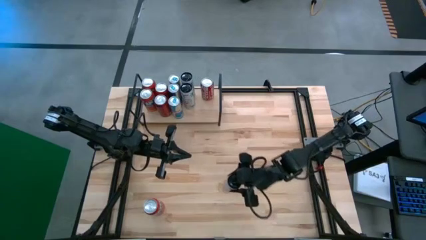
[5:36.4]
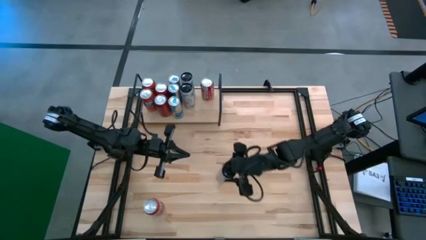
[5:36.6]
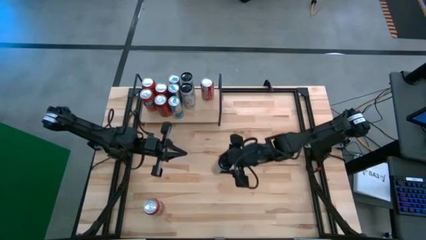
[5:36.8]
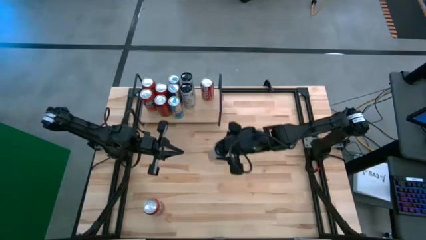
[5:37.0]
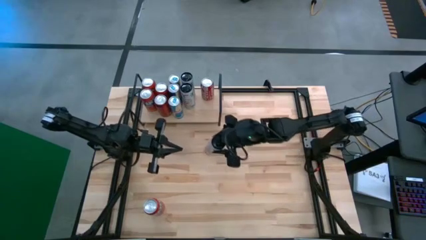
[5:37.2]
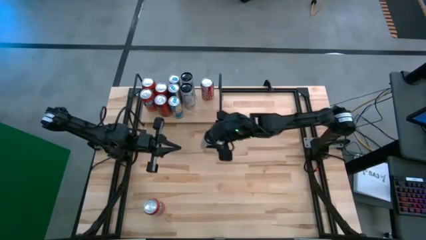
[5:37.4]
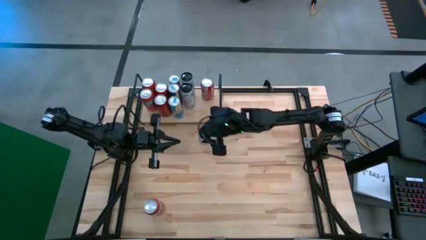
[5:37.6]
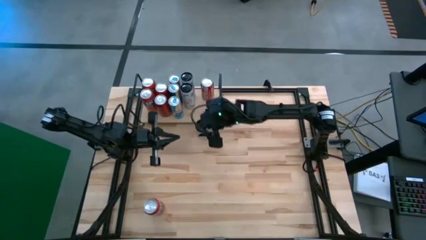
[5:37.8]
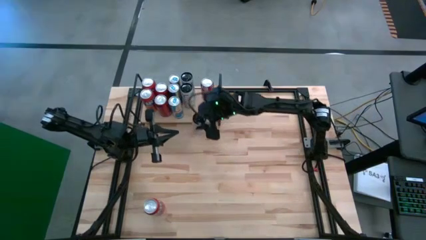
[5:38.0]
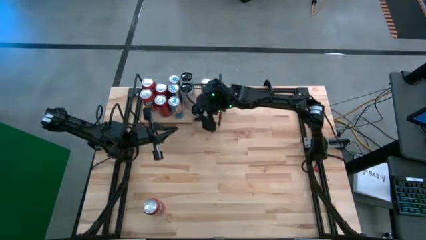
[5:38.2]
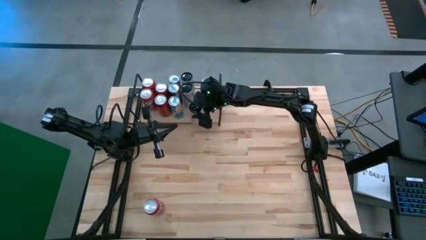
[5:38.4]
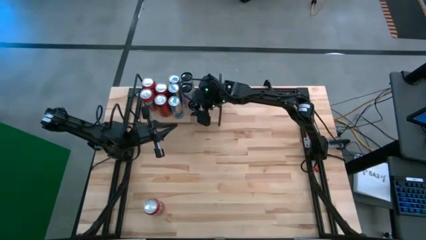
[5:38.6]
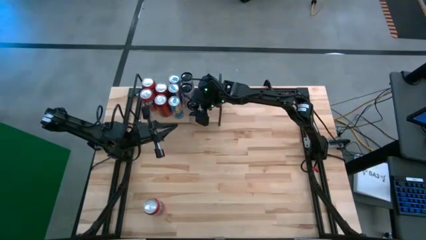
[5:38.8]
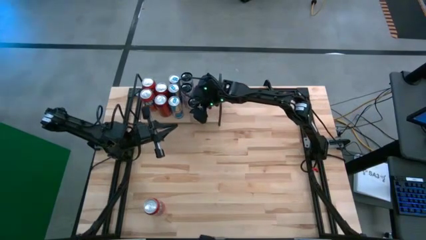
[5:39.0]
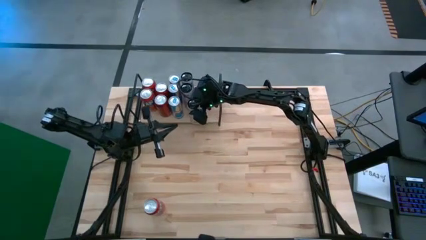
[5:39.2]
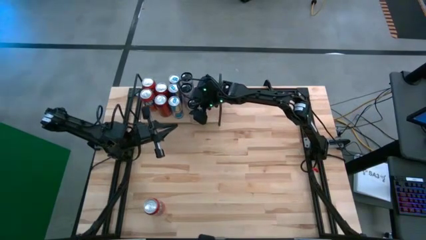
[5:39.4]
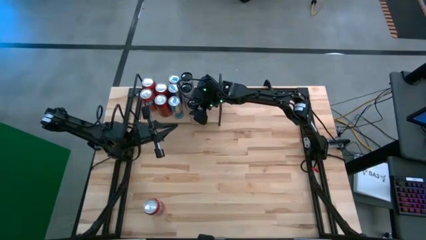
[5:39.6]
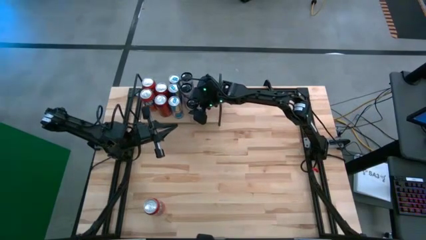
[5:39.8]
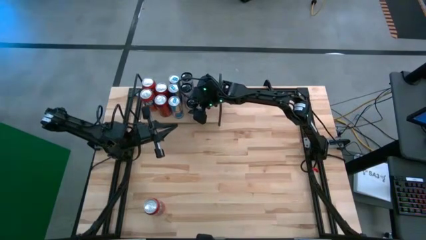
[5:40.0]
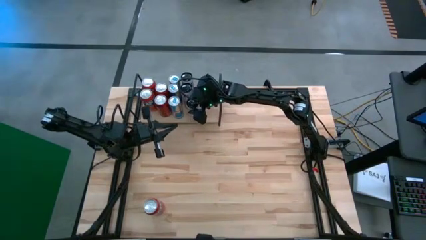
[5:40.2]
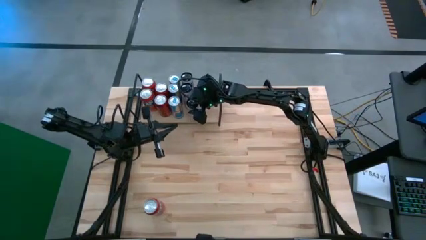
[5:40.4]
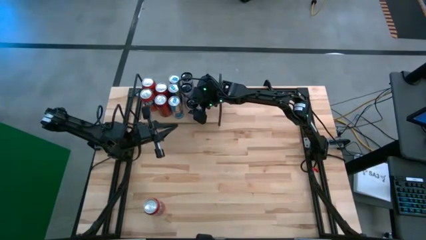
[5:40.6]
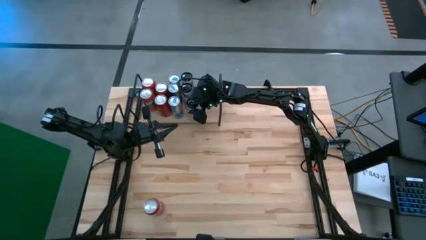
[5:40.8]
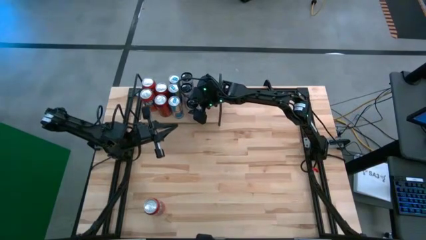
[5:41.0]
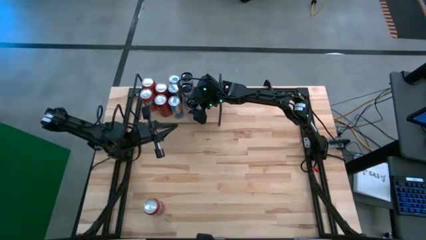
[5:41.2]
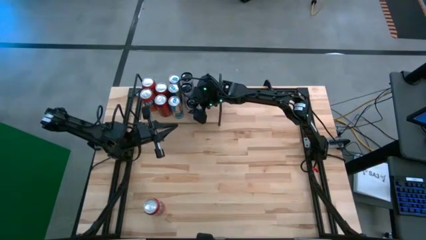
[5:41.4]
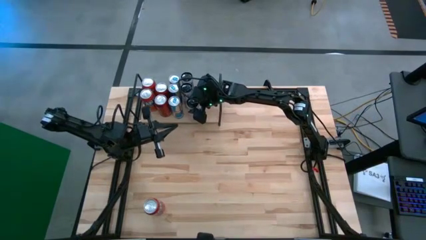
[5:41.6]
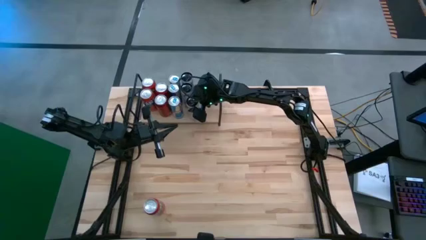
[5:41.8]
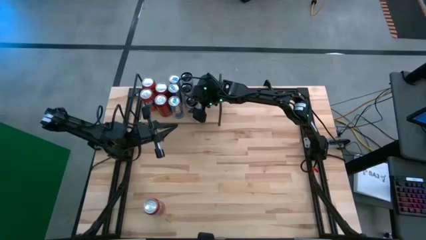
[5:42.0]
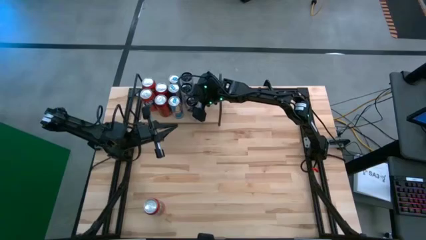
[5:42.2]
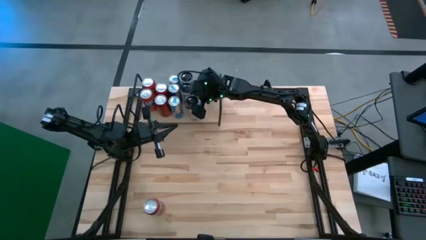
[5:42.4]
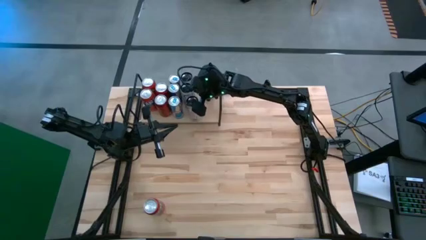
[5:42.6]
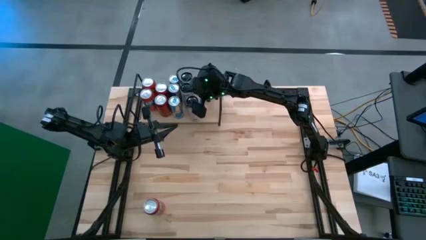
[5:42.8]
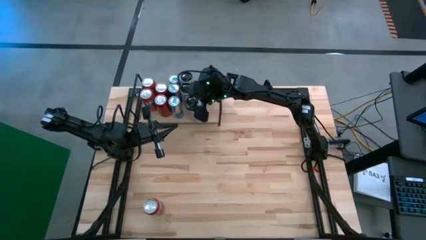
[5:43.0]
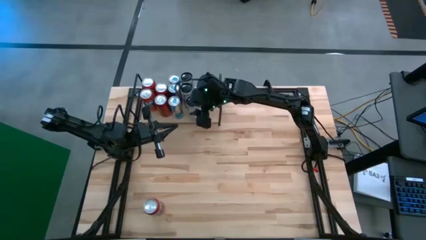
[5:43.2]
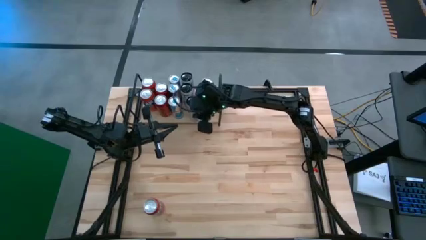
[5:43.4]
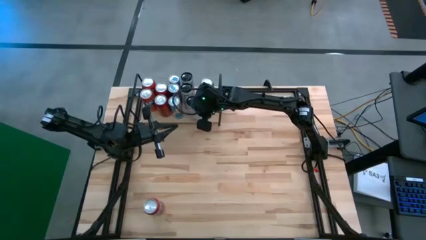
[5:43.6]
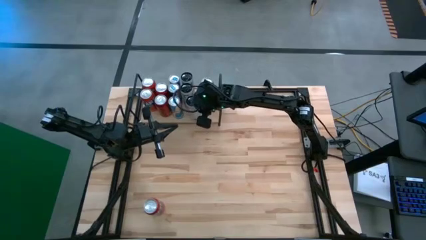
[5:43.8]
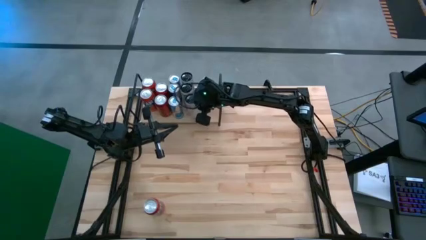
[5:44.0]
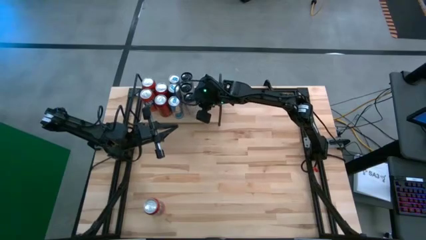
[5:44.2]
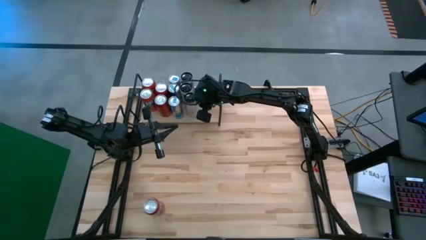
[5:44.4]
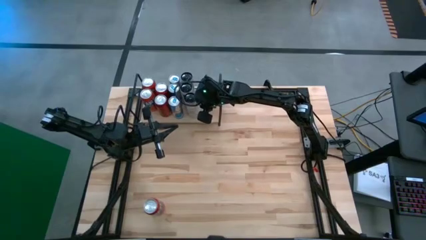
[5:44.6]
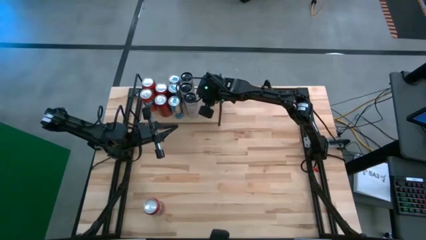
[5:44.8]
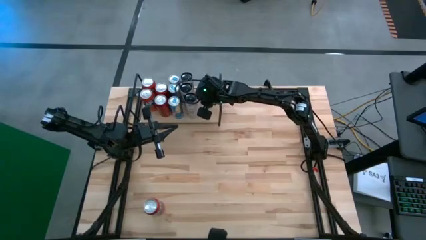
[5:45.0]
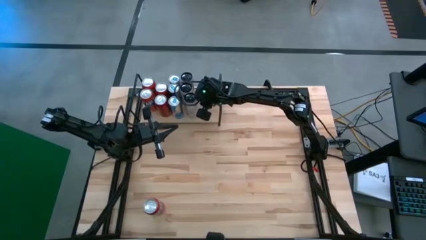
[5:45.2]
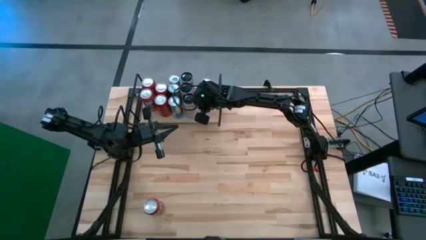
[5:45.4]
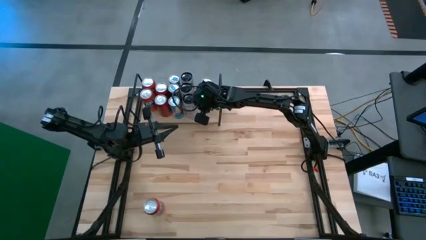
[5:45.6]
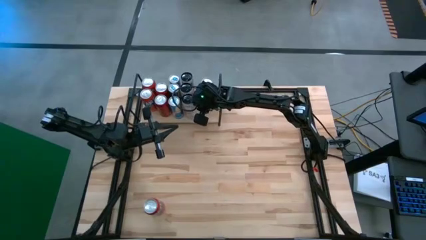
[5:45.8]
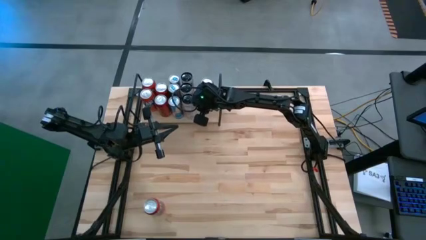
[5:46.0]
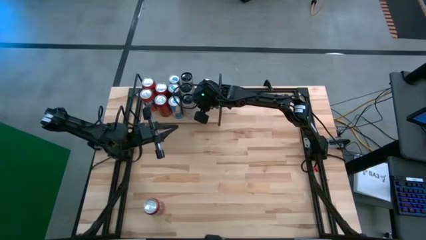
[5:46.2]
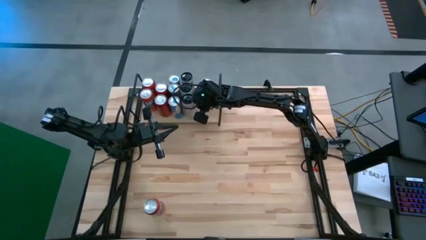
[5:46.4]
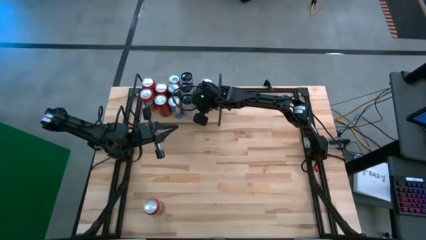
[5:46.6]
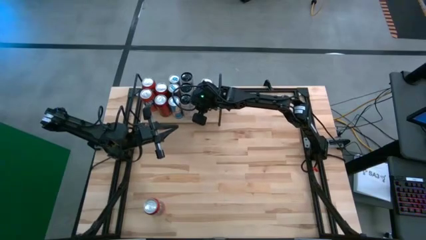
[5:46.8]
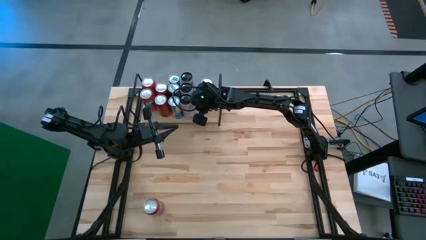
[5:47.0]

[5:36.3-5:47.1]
Task: Place canned beverage on shelf
Put the white pink soda can on the shelf aligned with the other white pink soda cans

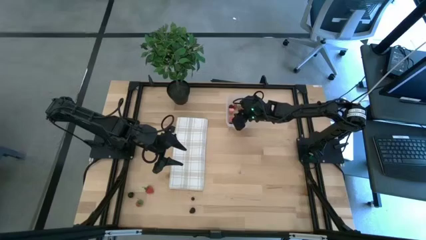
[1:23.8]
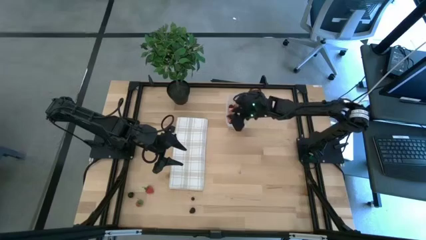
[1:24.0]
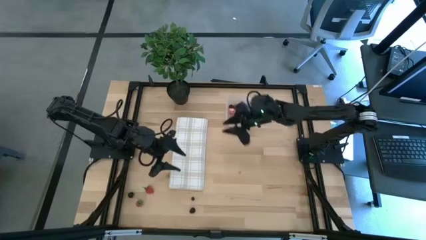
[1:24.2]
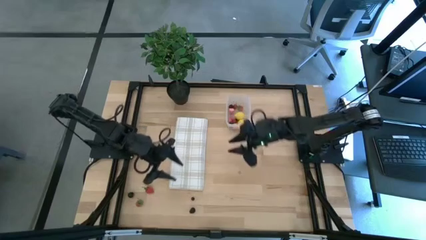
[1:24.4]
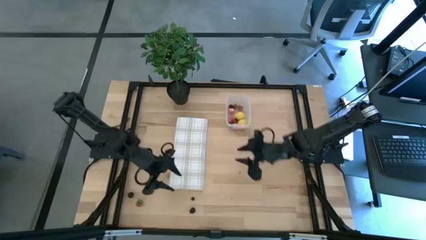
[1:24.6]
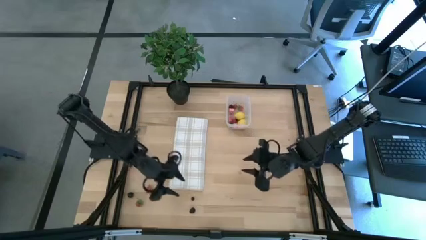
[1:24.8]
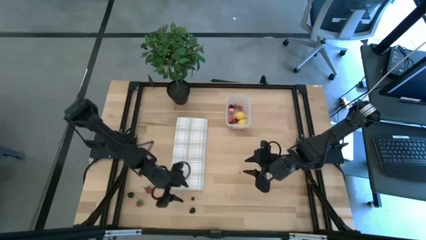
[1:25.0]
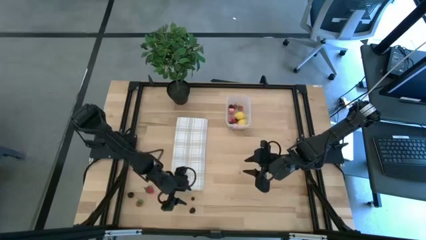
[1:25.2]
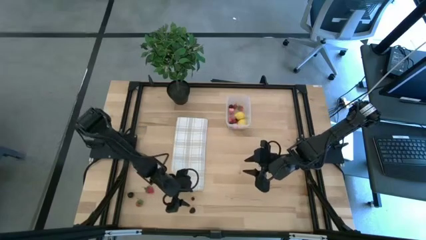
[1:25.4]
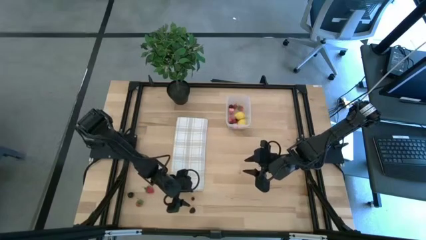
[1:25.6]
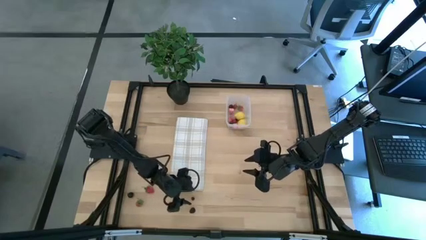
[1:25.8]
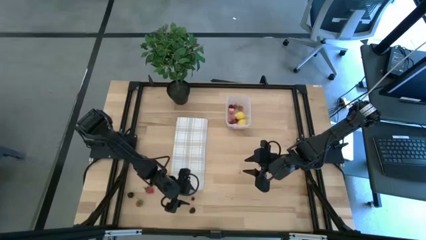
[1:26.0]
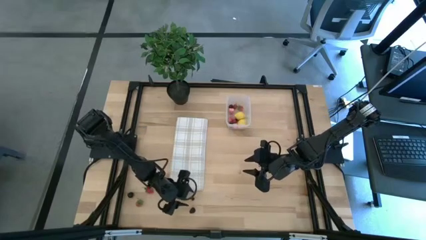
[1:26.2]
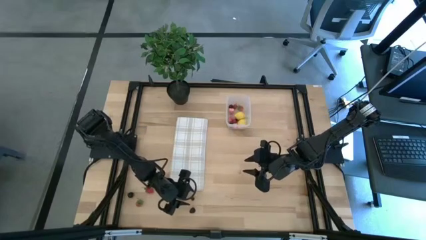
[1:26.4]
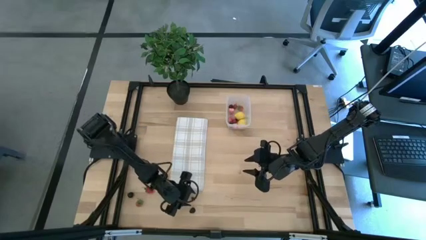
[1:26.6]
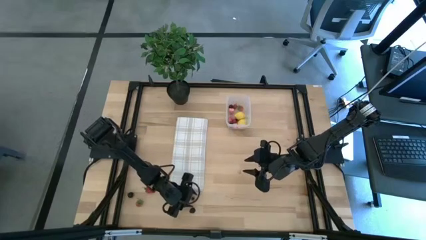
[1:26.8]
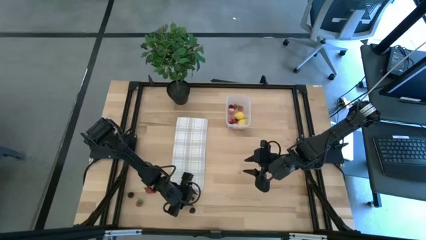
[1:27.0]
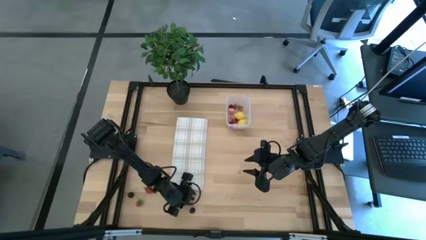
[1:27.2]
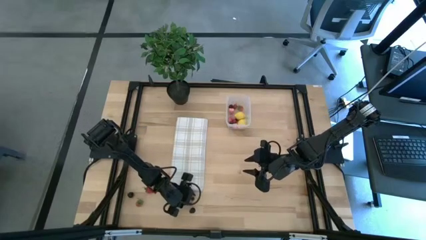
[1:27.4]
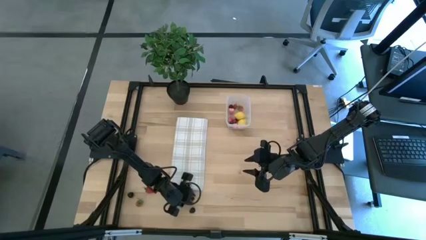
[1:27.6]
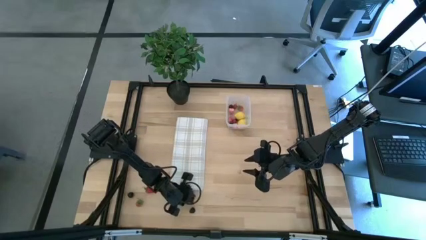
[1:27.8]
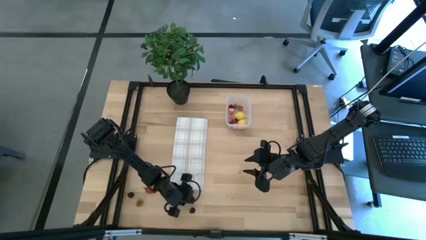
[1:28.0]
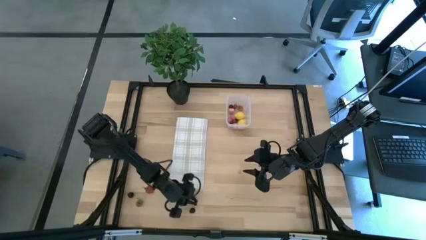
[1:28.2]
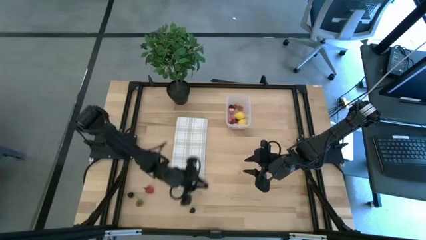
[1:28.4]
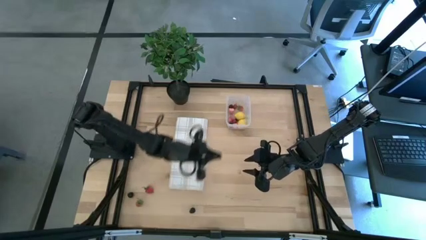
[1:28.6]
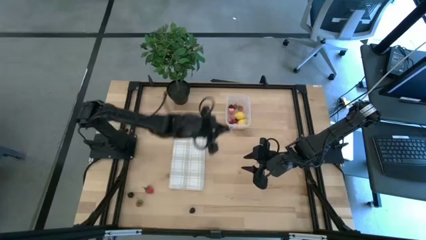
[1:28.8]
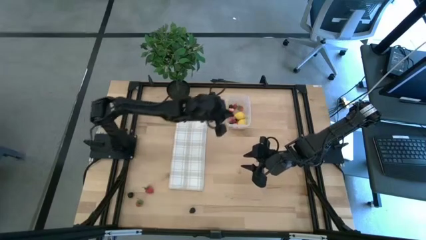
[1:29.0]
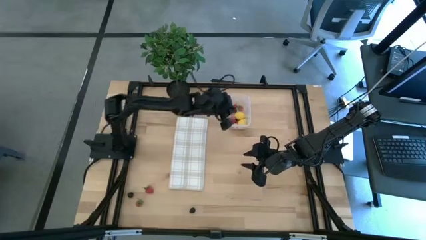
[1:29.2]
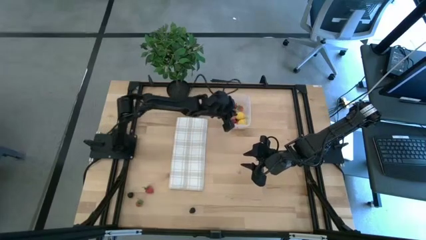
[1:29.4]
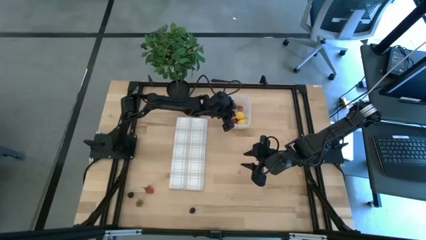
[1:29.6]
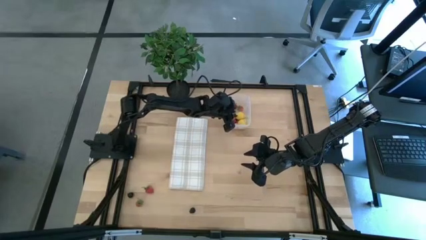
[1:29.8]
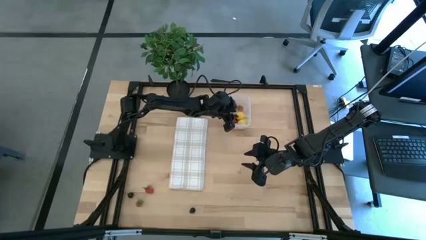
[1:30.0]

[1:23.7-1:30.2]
Task: Pick and placing Produce into tupperware
Put the blueberry into the transparent bin
